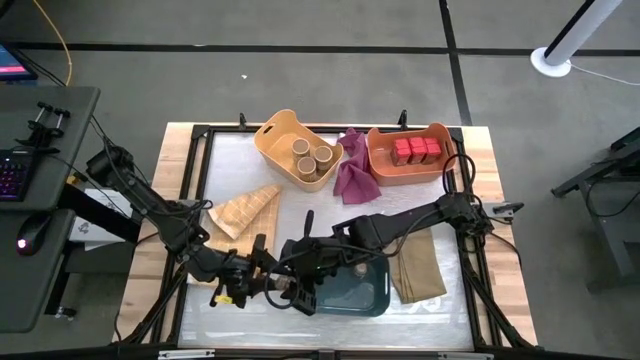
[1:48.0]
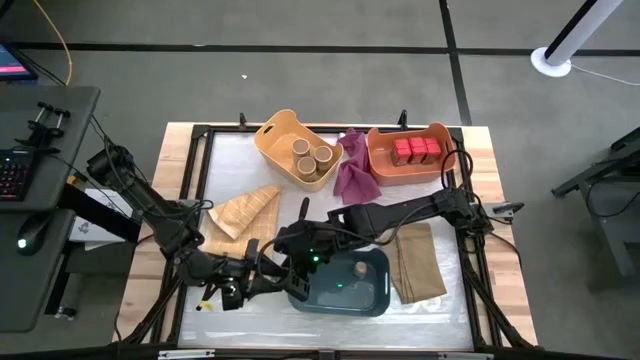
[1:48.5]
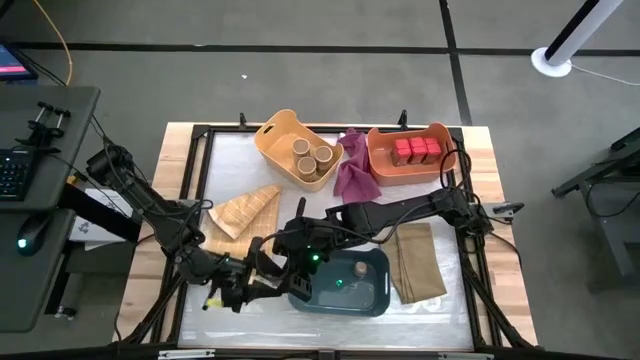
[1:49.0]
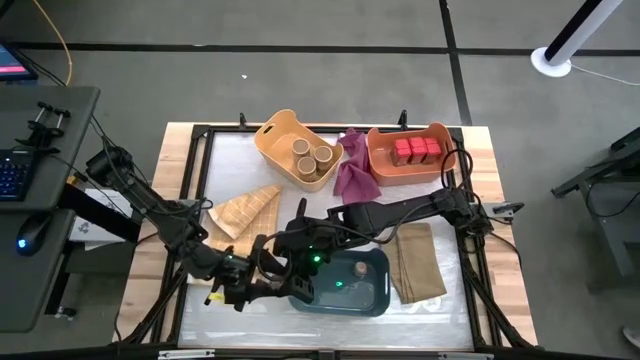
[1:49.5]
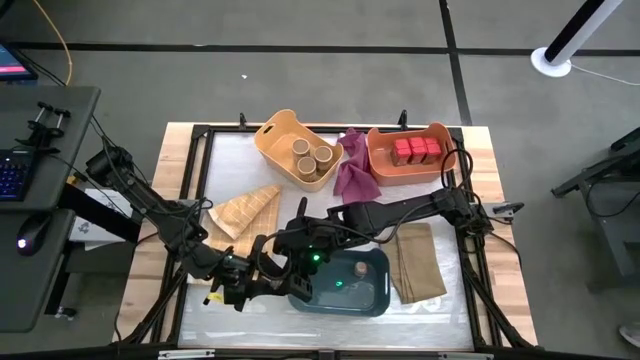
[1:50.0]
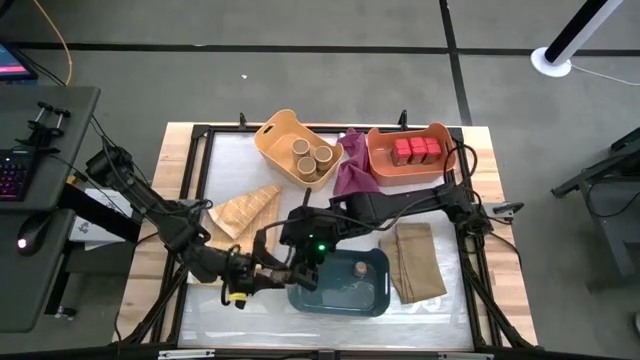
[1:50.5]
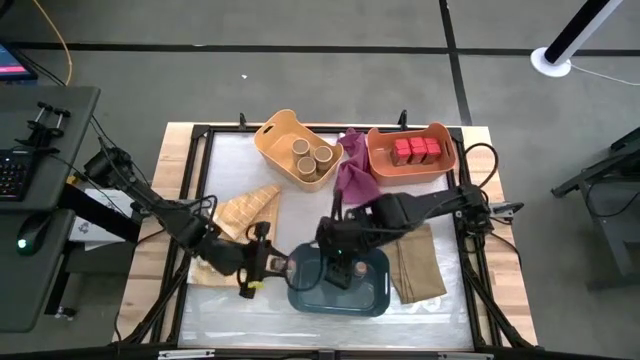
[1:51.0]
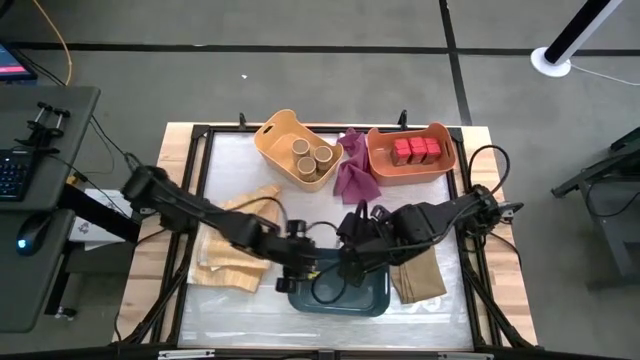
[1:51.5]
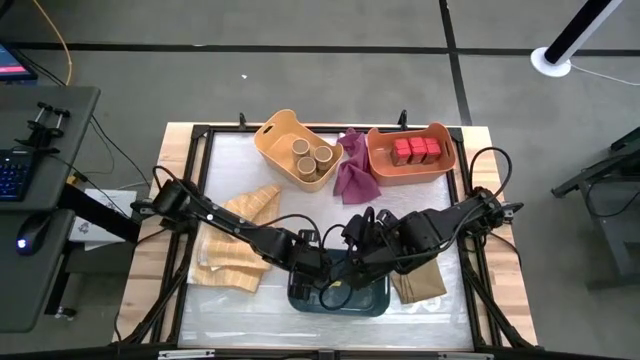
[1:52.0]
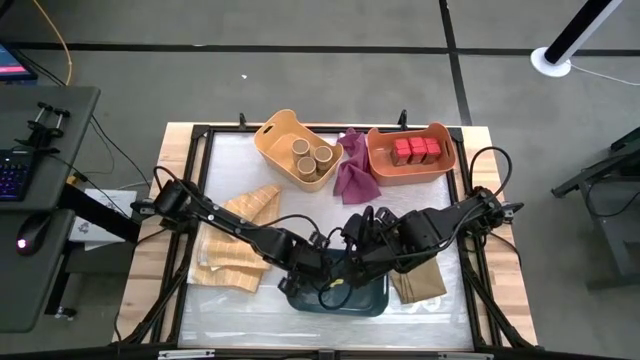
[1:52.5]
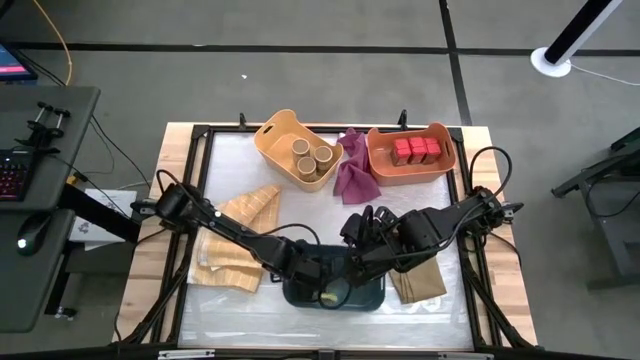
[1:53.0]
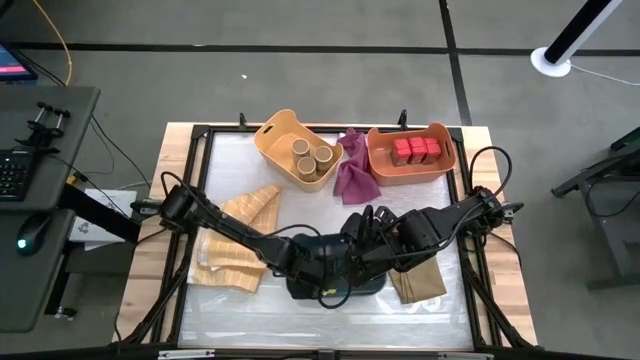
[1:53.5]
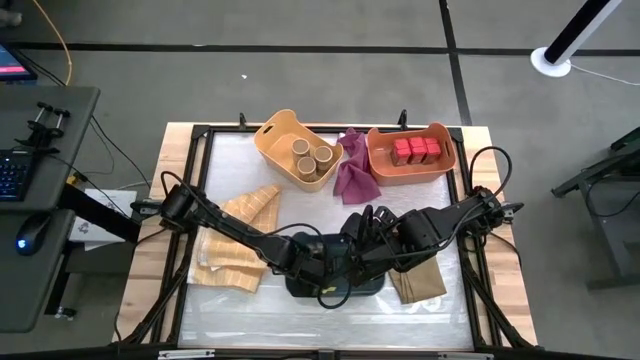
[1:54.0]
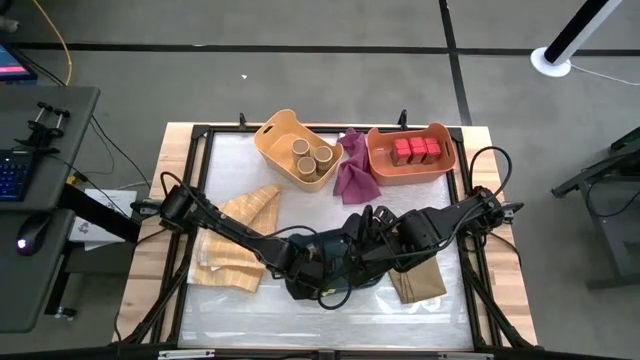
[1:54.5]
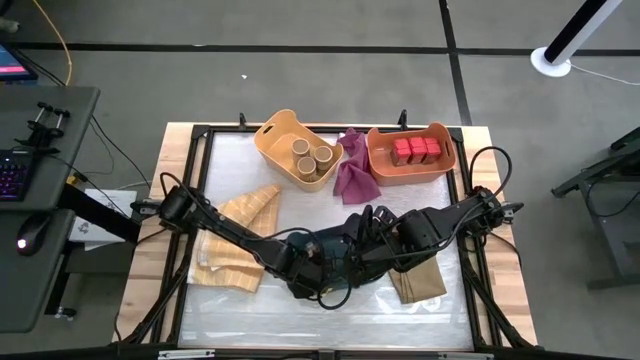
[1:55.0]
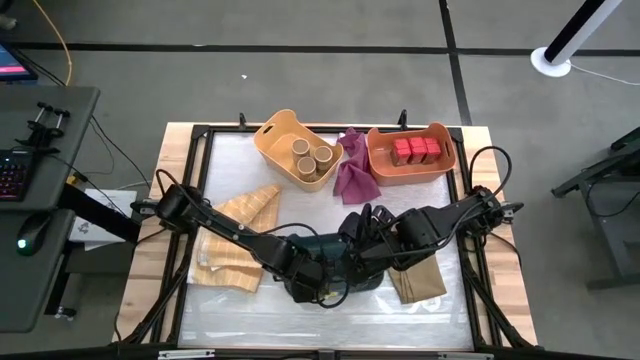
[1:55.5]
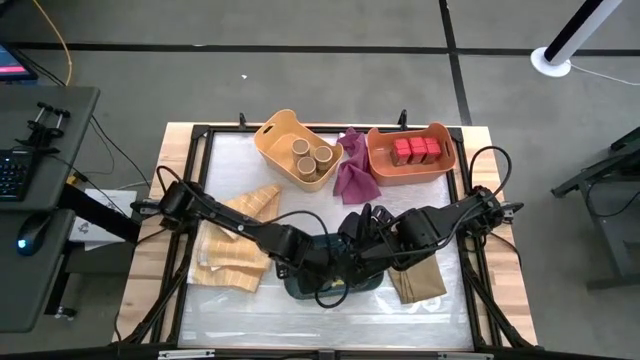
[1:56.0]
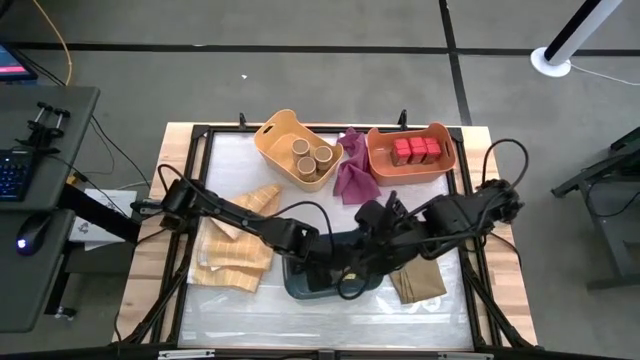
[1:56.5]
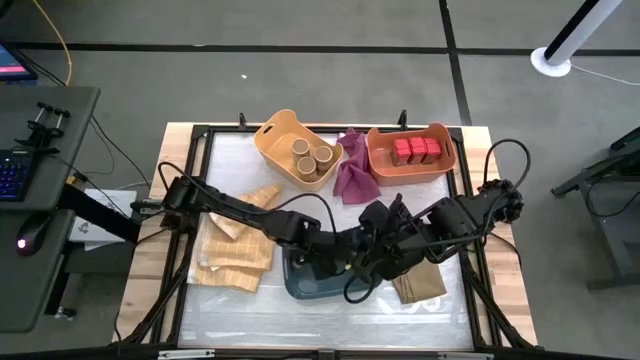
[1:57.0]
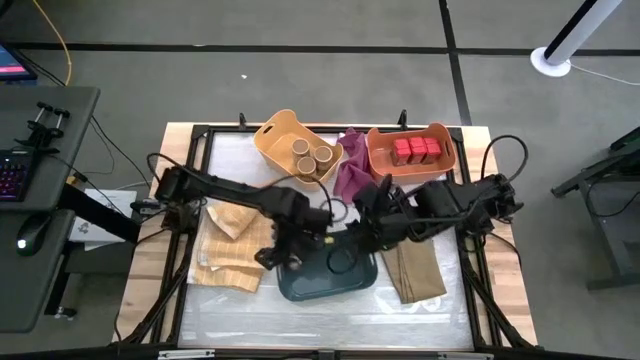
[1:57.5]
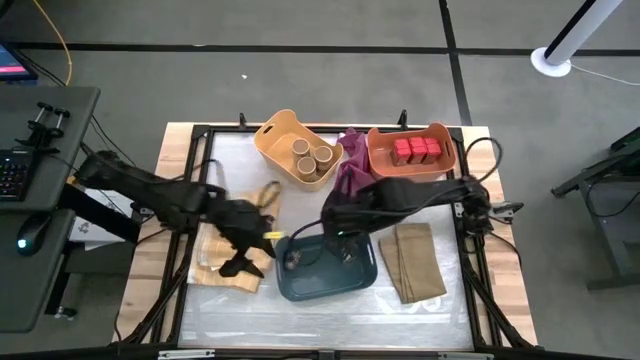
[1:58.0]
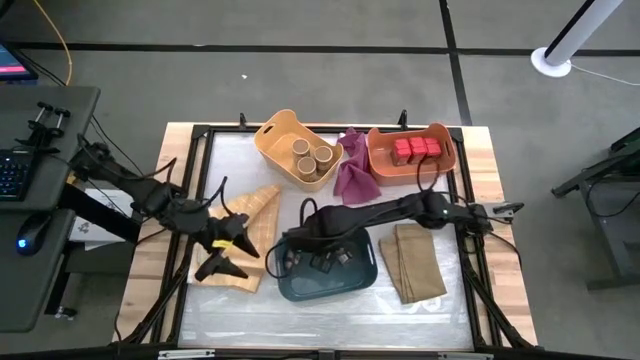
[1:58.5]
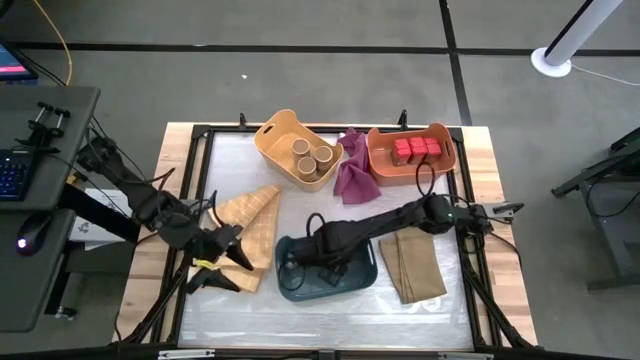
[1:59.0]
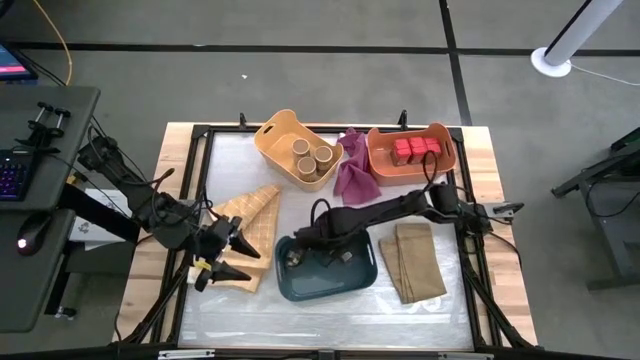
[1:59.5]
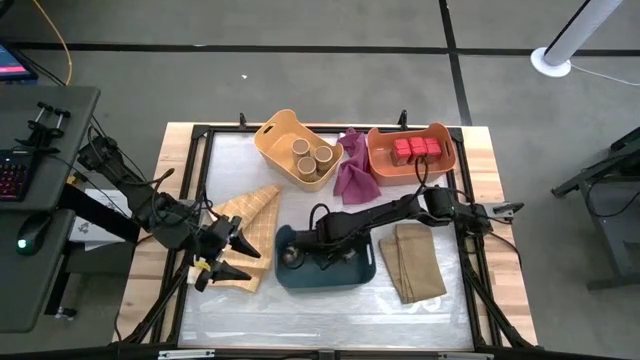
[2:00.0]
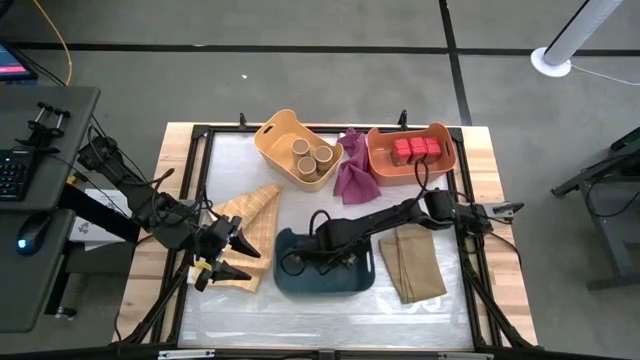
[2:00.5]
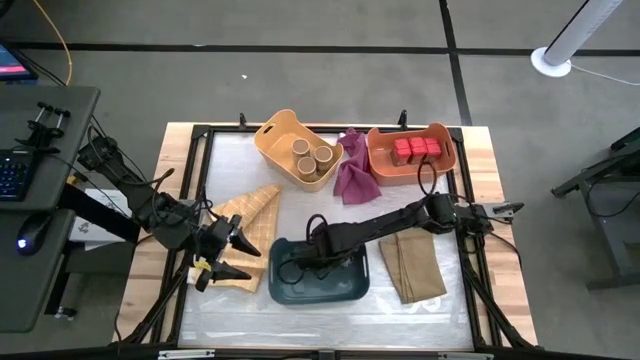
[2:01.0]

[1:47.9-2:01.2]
Task: Sort spices by type
Put the transparent seasoning bottle into the blue bin

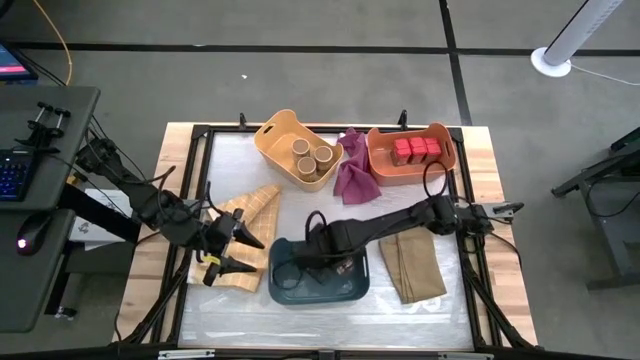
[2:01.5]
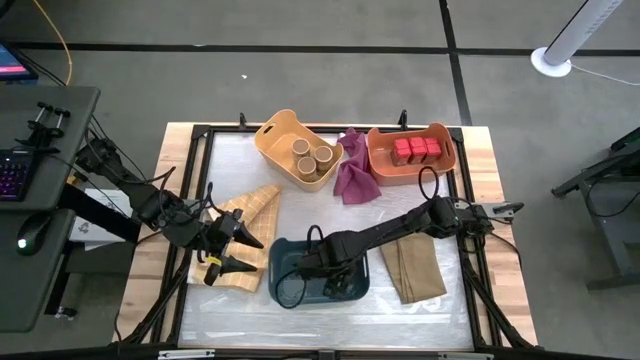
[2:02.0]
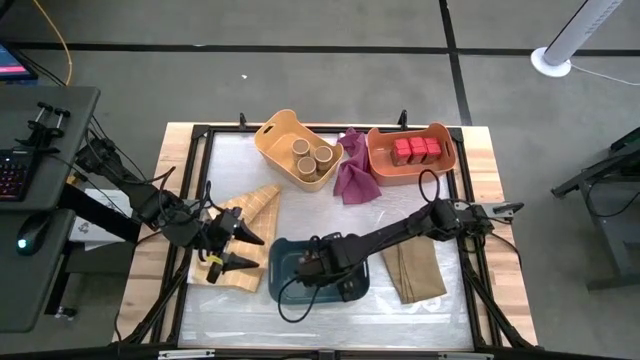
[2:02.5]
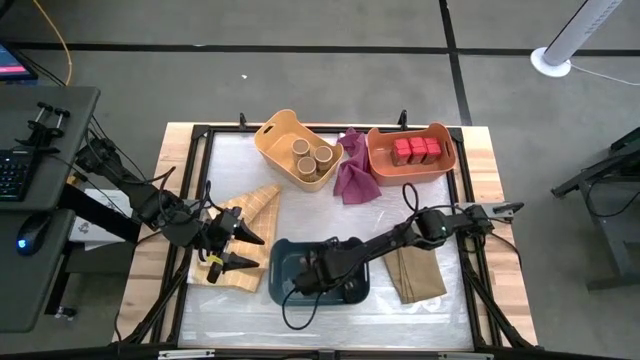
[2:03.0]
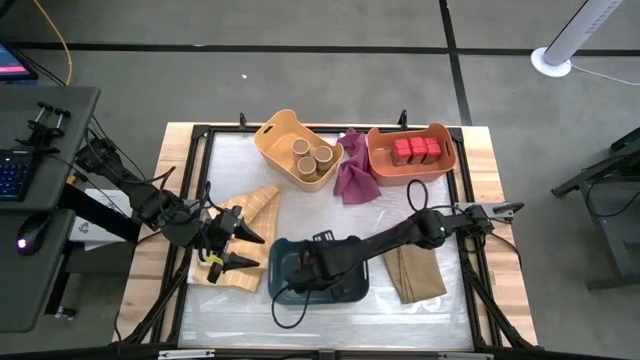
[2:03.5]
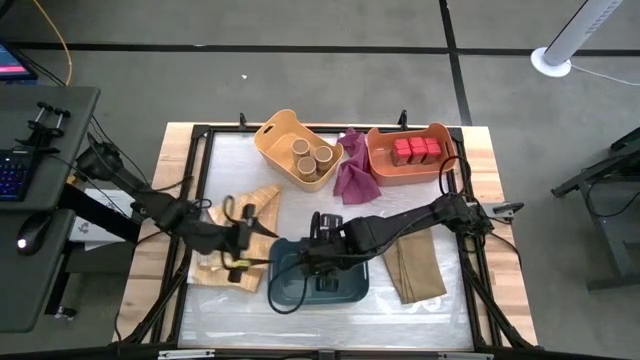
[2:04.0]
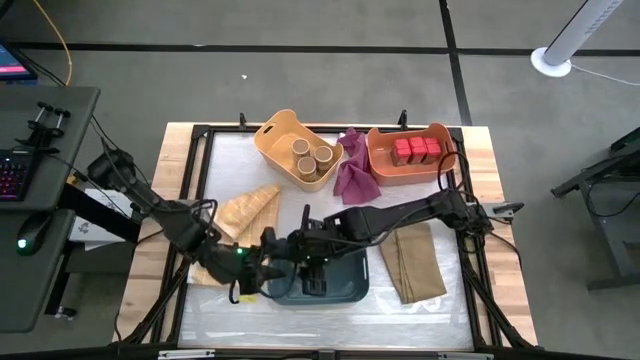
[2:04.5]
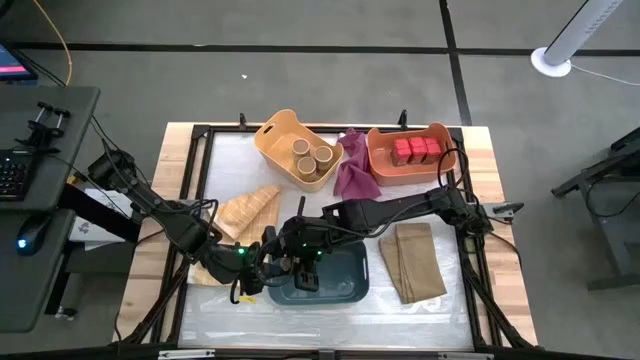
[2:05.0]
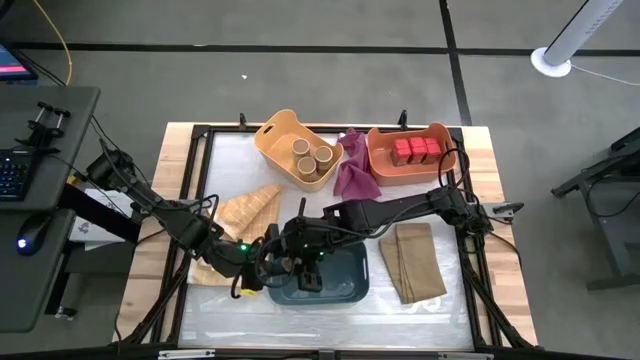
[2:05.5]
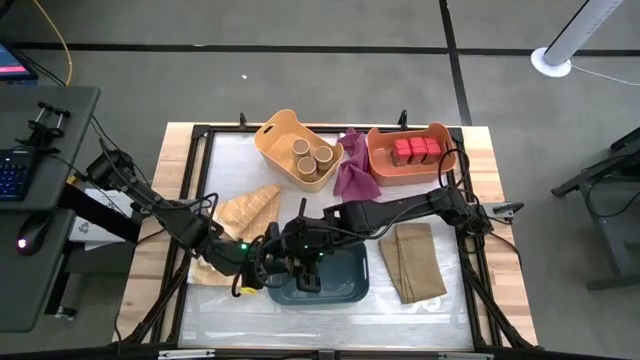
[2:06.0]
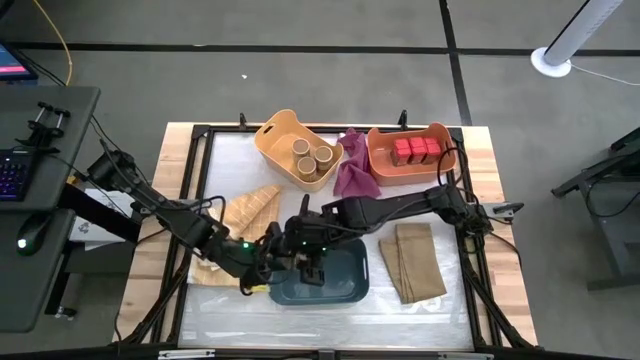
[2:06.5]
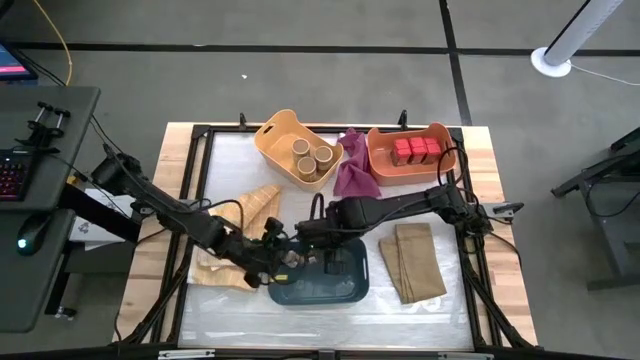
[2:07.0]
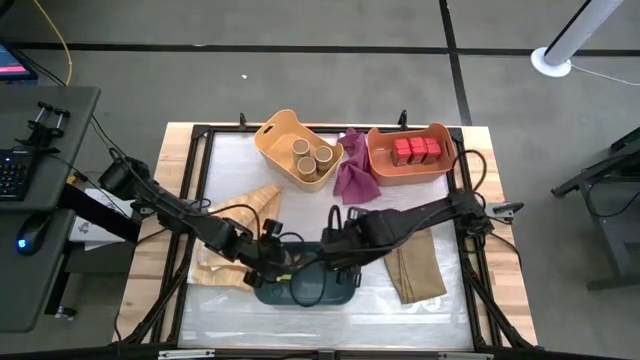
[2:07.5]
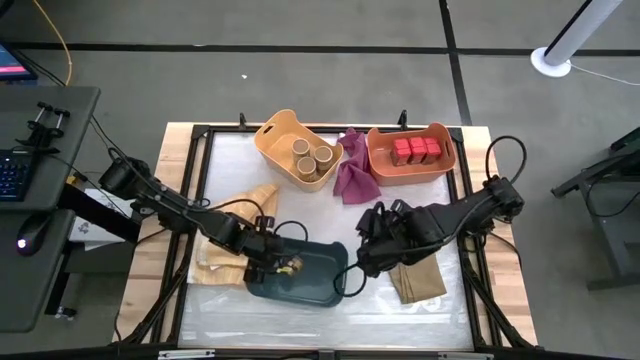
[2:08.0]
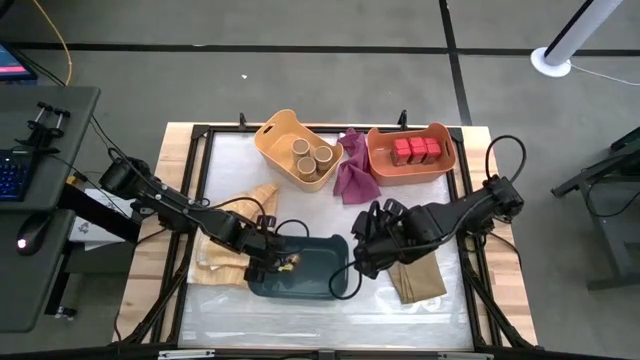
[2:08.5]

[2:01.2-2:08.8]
Put the transparent seasoning bottle into the blue bin
